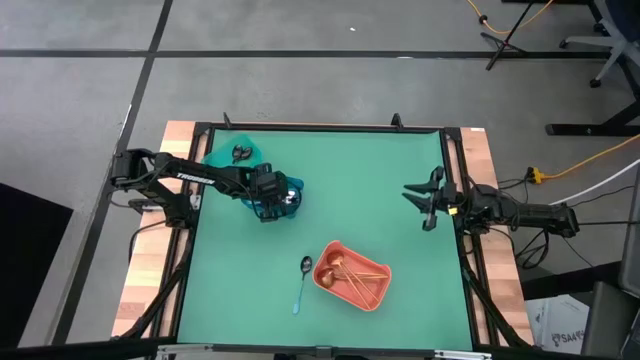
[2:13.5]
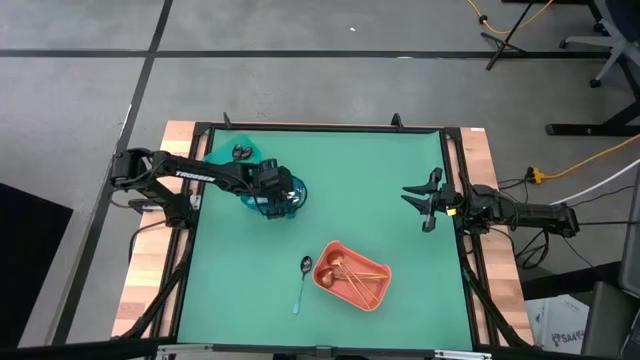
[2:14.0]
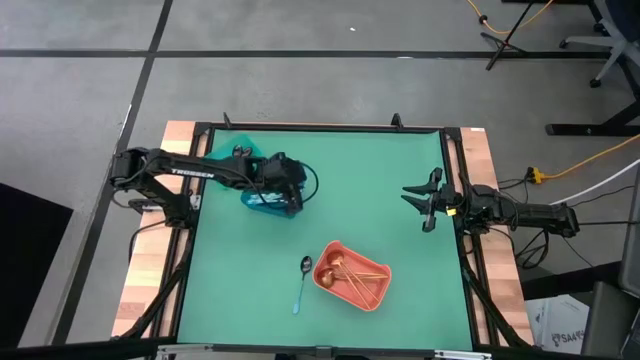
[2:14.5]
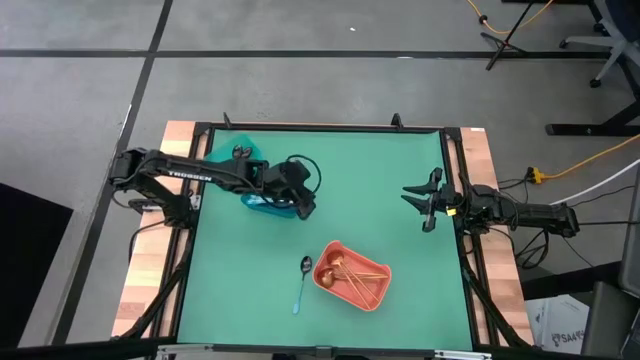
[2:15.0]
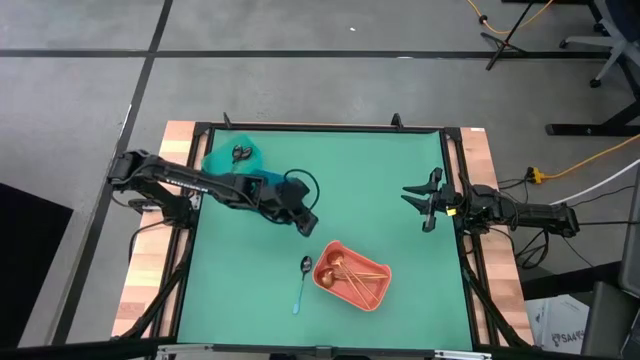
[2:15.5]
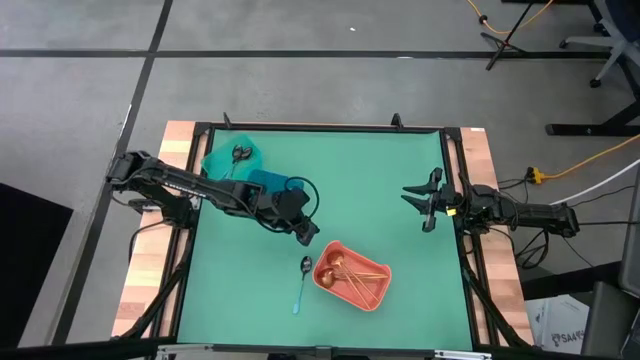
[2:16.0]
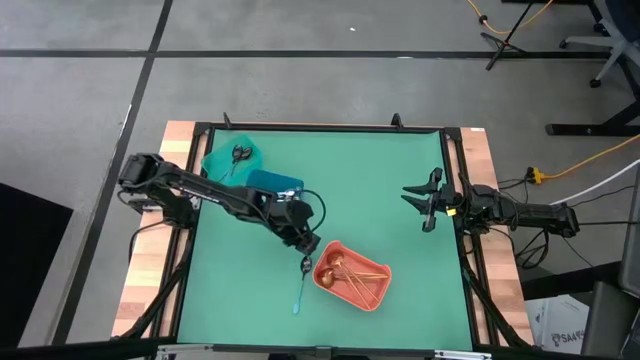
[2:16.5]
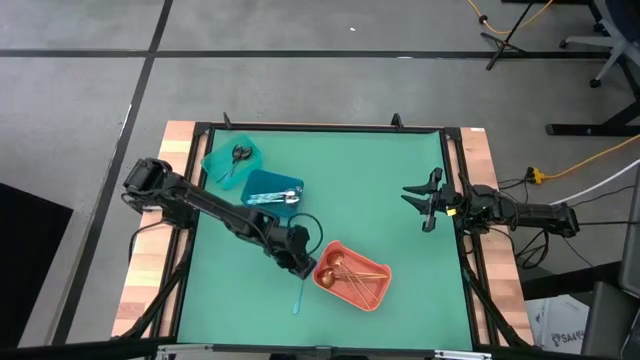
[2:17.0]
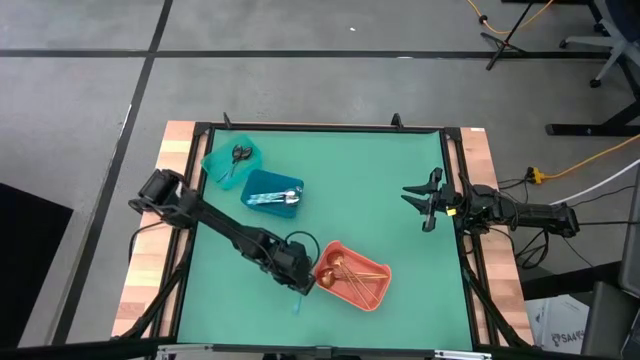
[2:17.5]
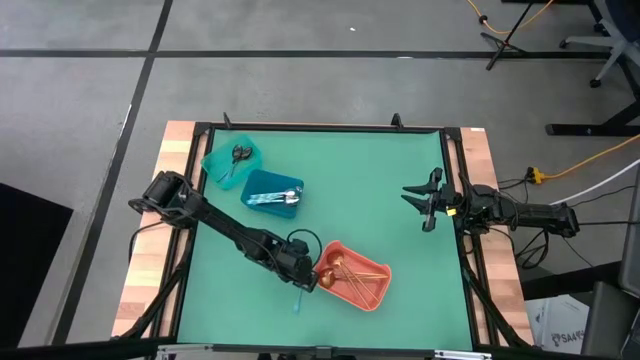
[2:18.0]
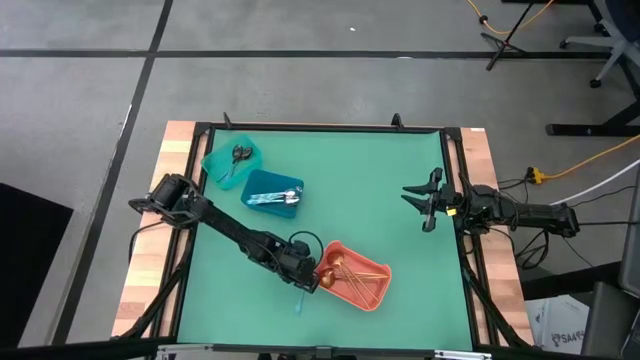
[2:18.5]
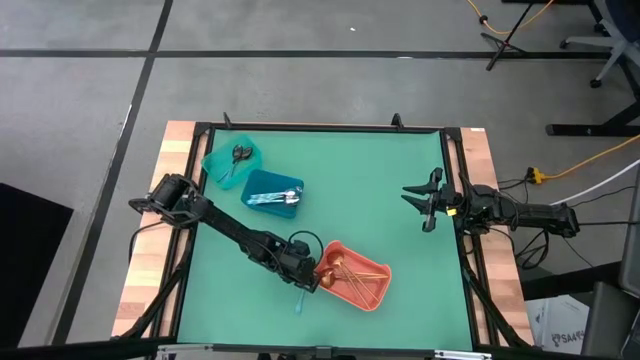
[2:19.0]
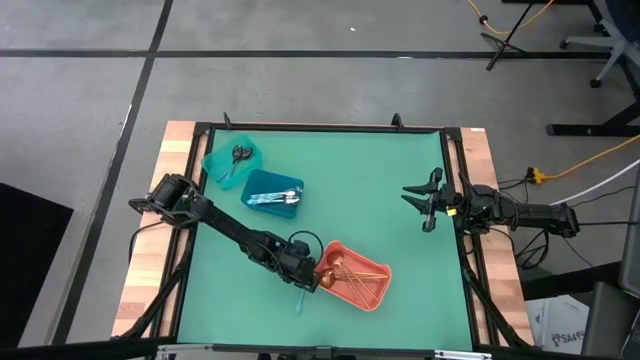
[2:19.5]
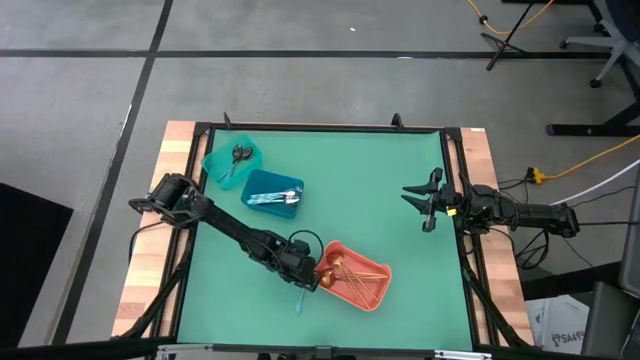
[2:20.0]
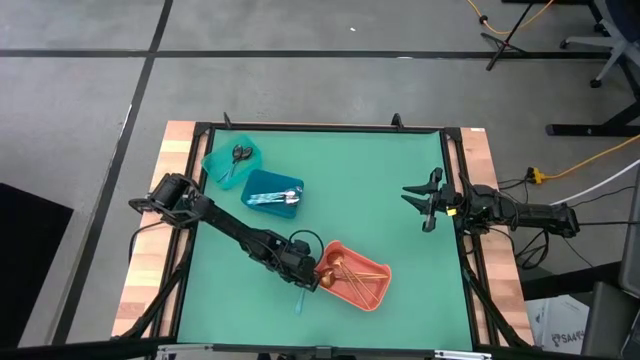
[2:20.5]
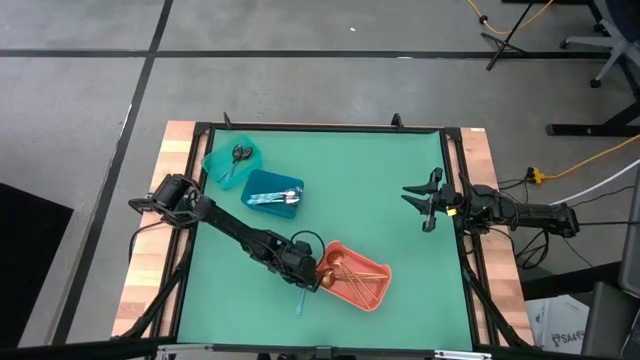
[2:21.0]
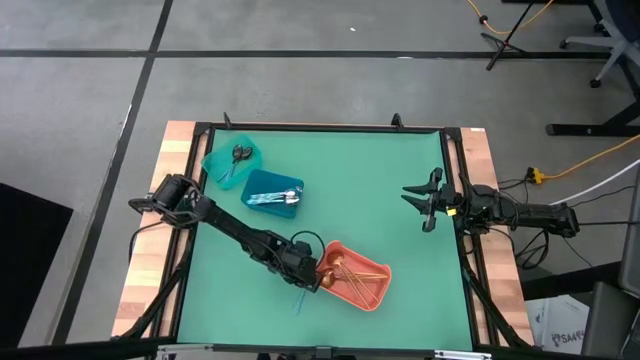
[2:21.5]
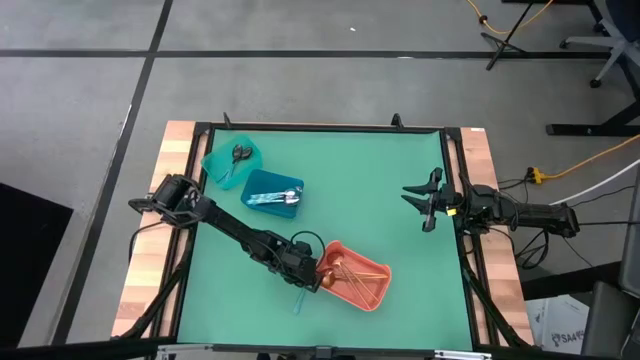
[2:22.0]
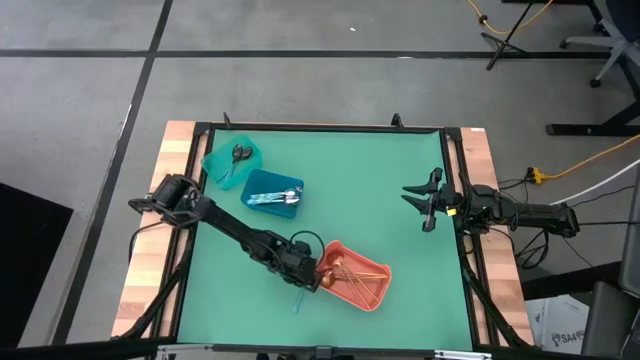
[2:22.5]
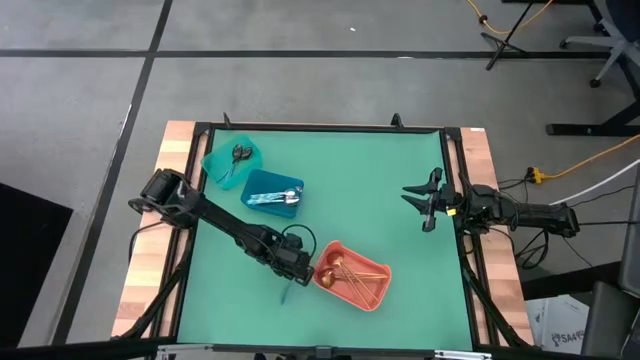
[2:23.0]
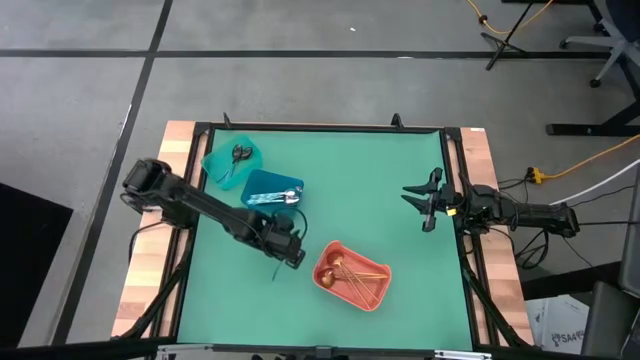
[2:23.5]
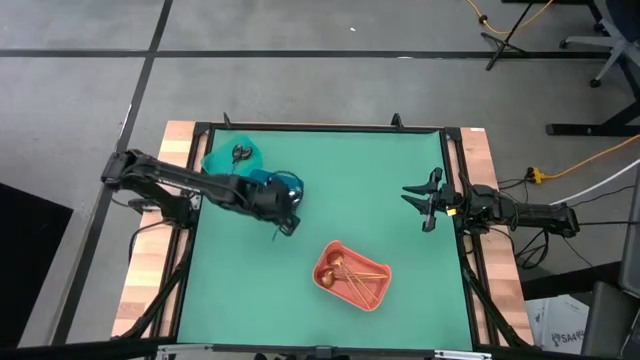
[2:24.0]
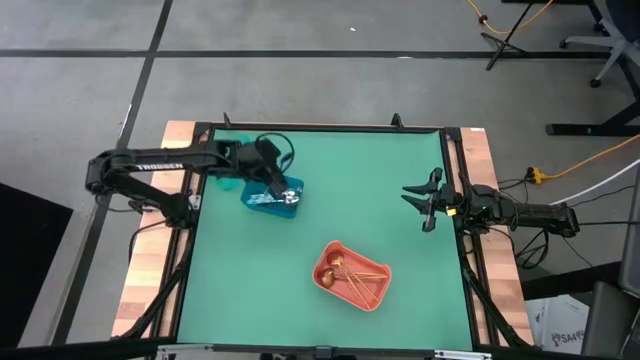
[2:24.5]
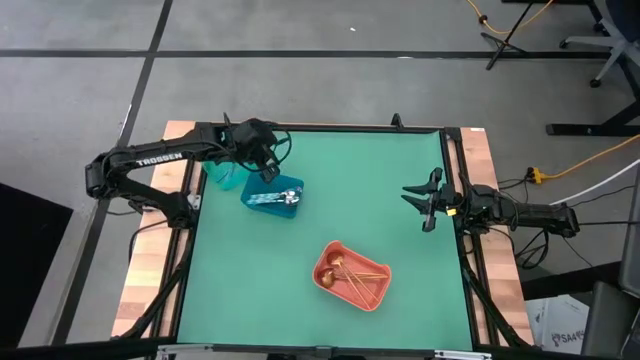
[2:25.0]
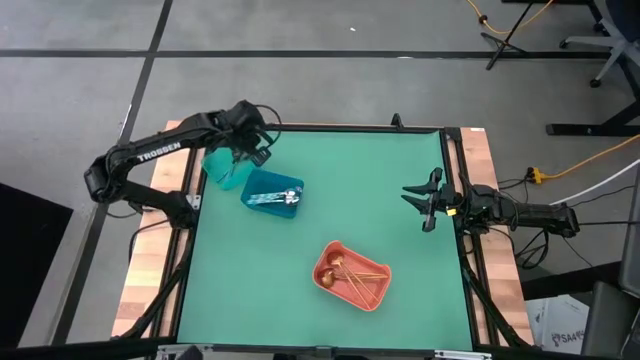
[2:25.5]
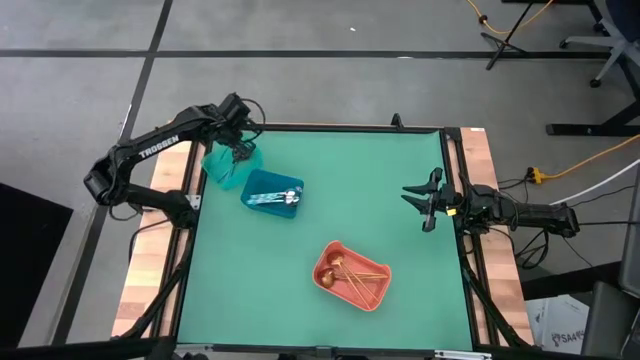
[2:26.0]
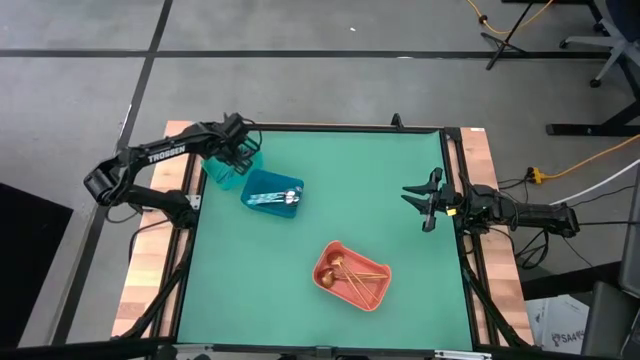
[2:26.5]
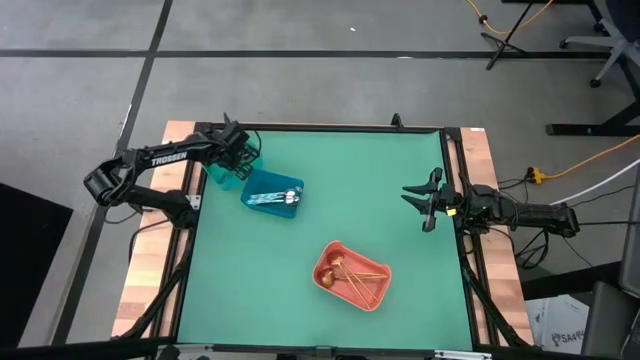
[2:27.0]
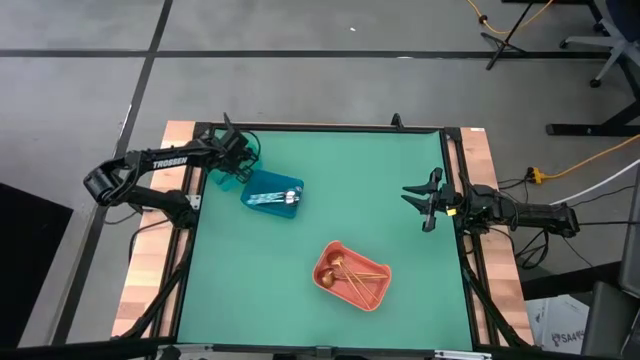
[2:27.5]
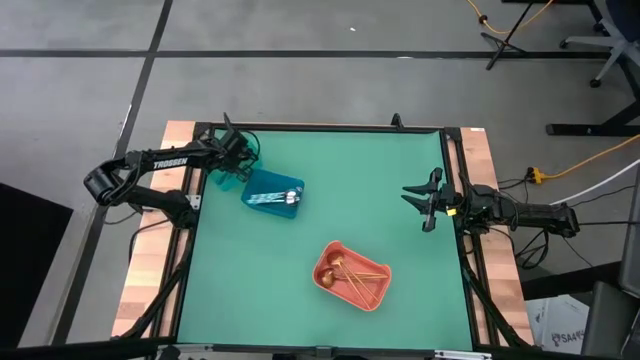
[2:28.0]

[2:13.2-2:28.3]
Task: Sort silverware by color (type)
Put the blue spoon into the transparent green bin

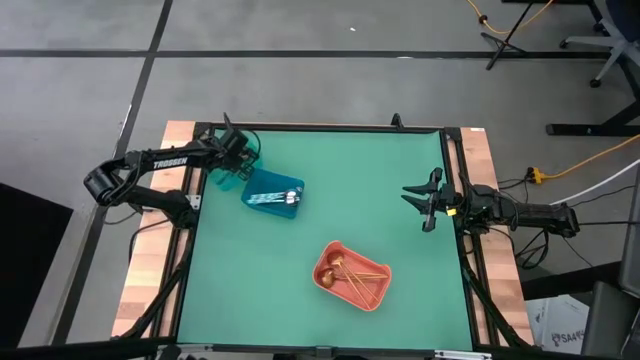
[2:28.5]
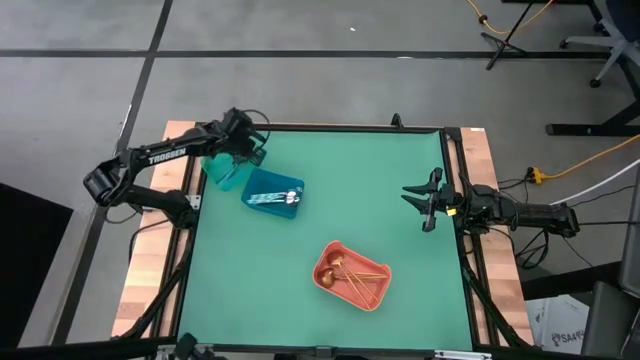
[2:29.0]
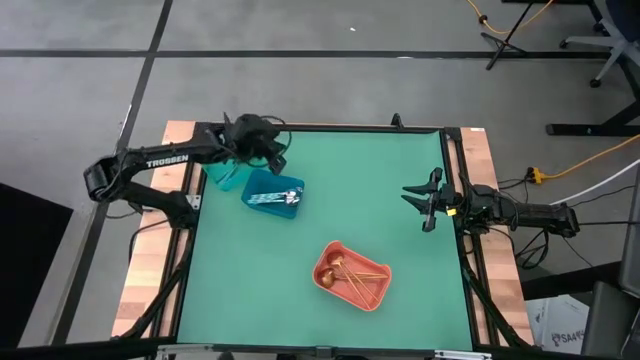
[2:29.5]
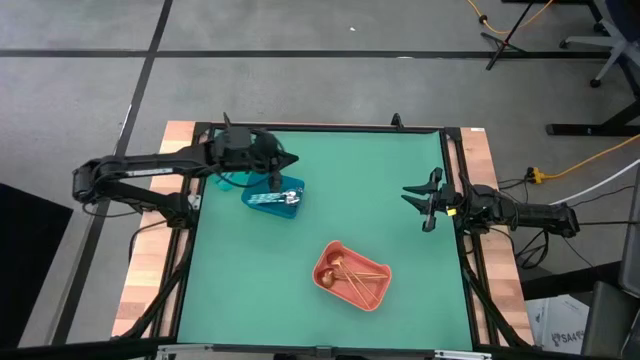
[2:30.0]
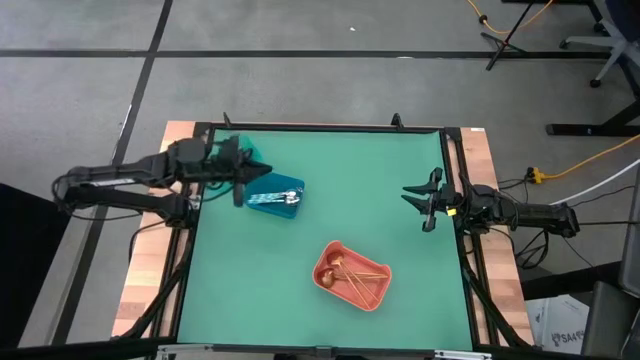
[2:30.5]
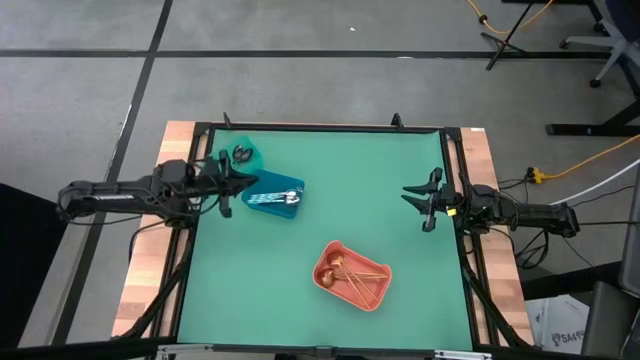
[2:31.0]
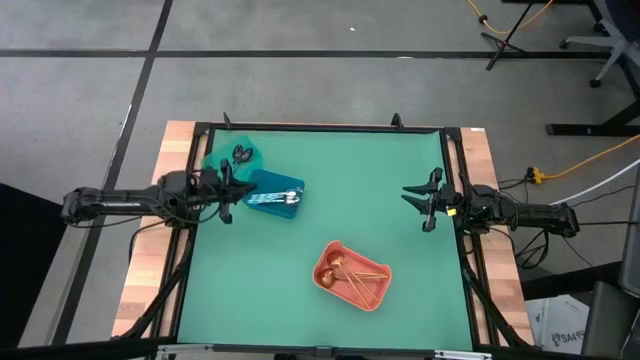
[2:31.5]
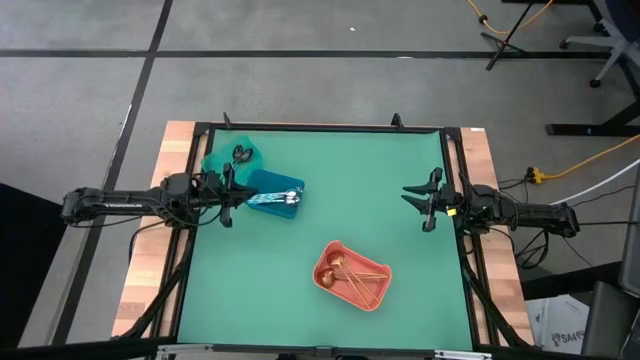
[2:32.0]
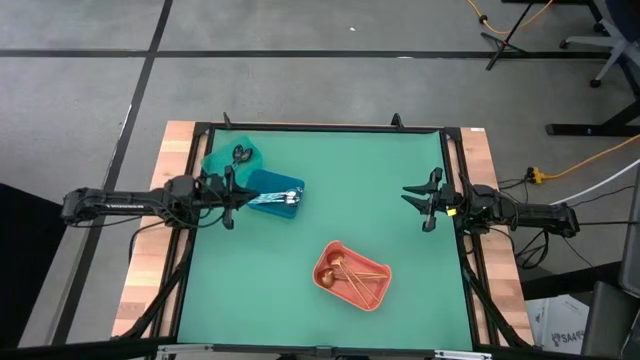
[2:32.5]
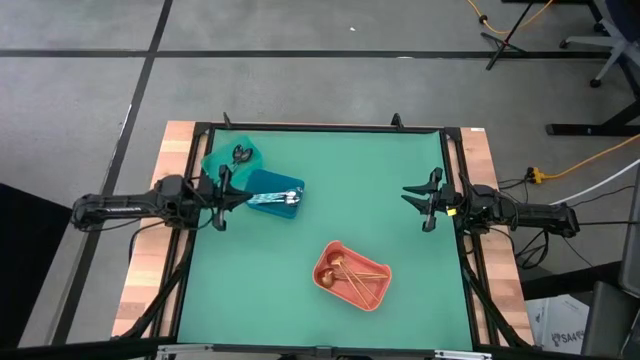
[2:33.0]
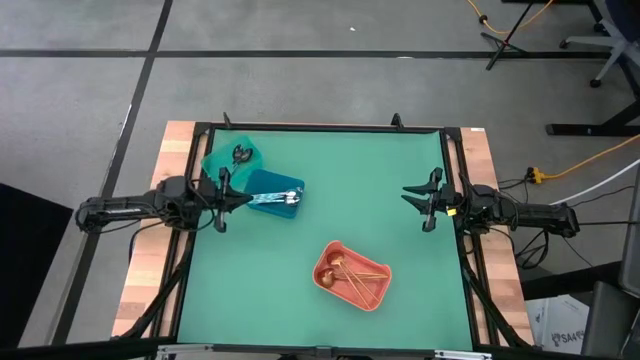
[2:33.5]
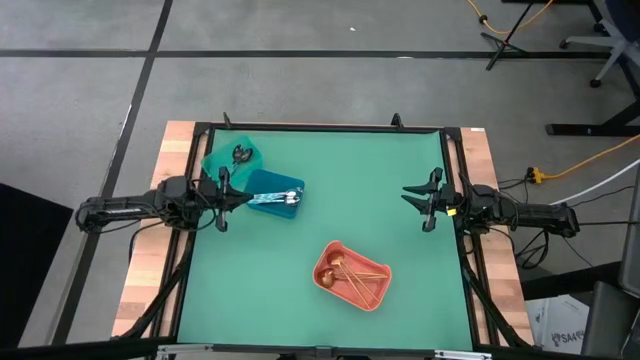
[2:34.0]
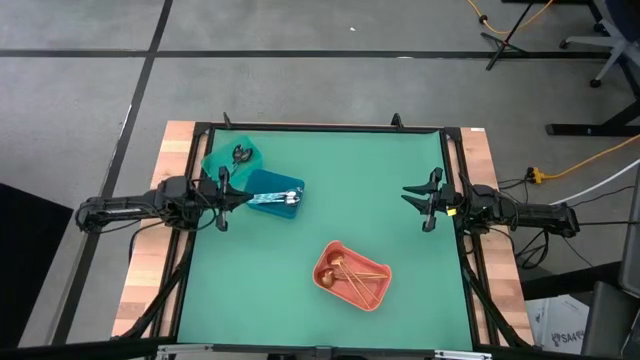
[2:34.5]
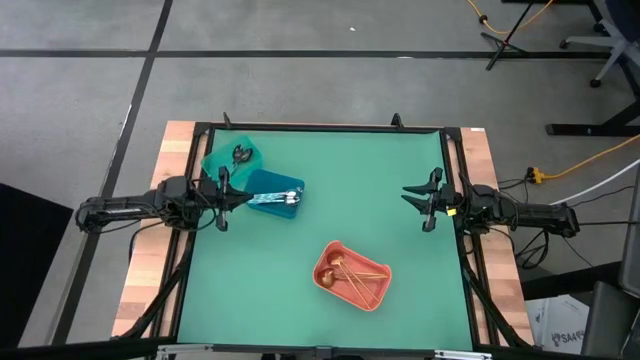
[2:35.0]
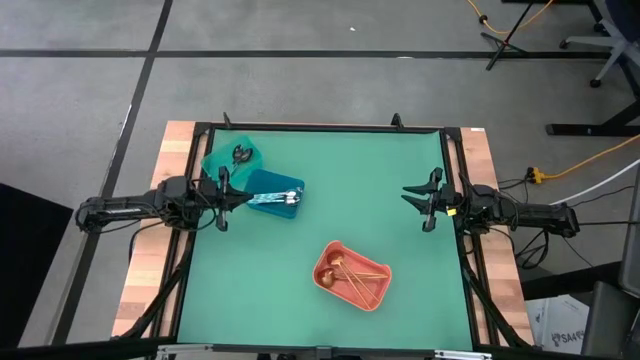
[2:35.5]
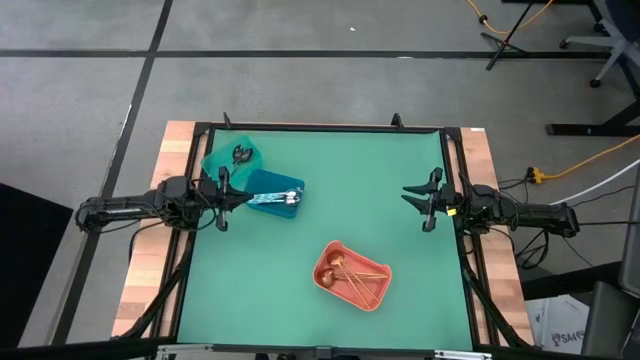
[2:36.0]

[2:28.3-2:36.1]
Return to Home Position
